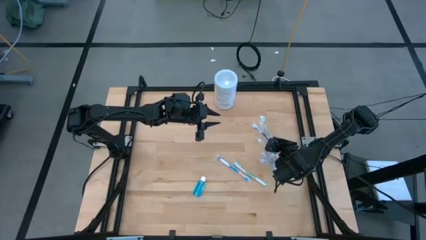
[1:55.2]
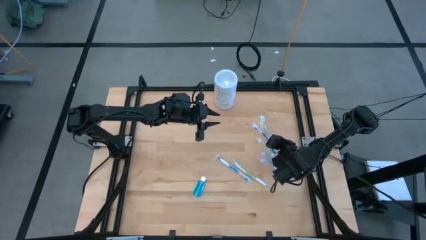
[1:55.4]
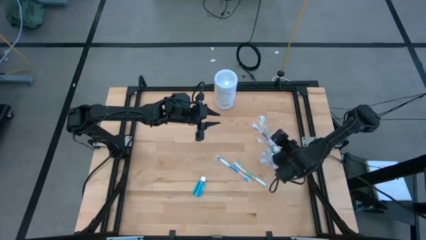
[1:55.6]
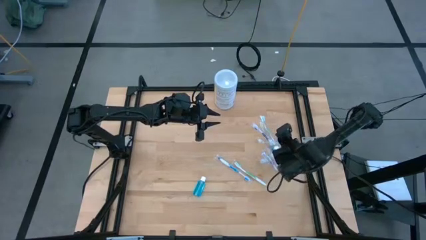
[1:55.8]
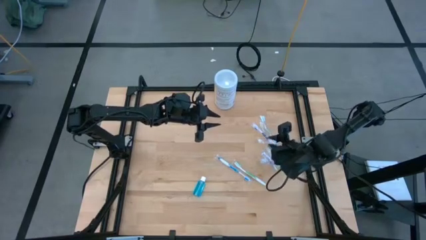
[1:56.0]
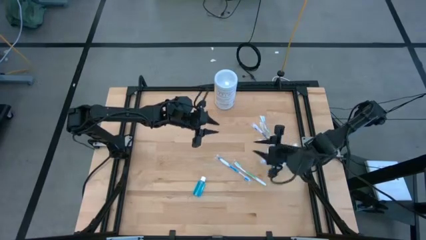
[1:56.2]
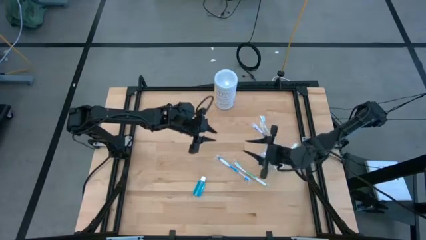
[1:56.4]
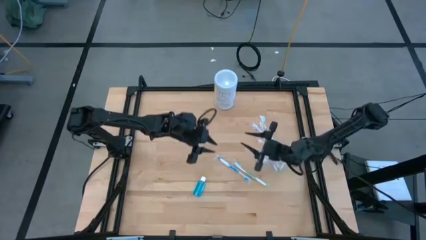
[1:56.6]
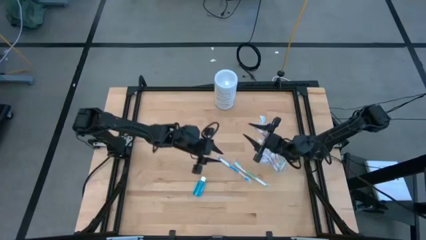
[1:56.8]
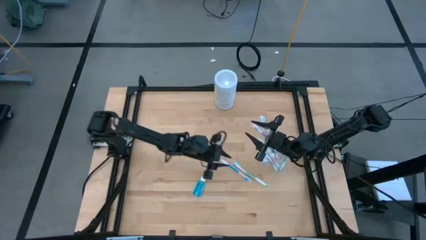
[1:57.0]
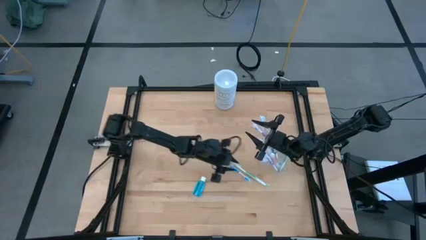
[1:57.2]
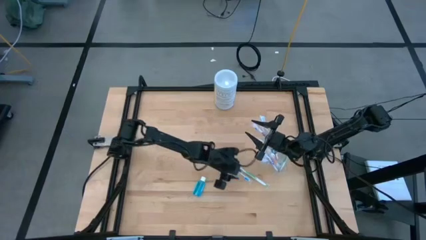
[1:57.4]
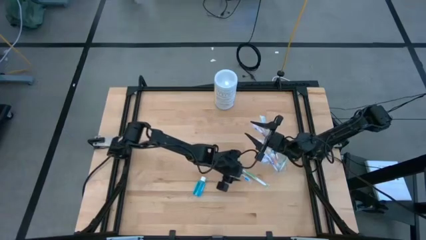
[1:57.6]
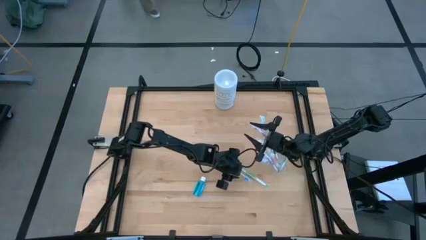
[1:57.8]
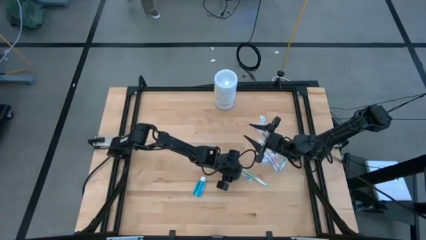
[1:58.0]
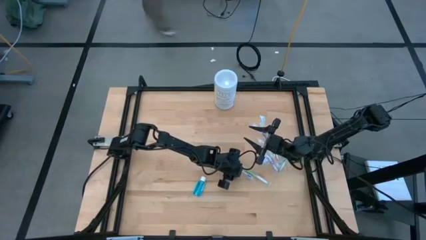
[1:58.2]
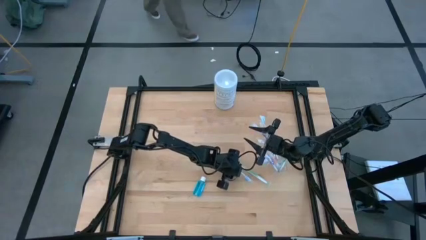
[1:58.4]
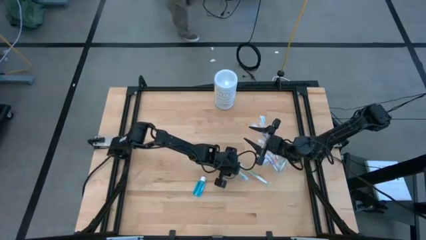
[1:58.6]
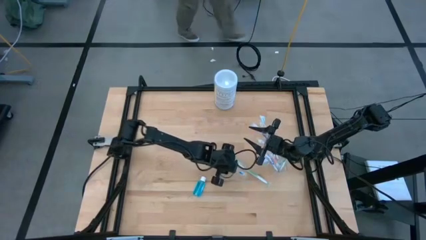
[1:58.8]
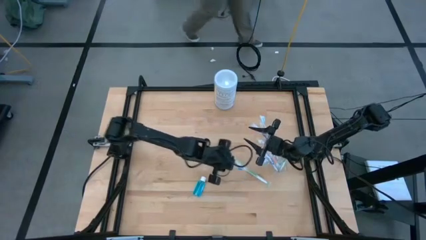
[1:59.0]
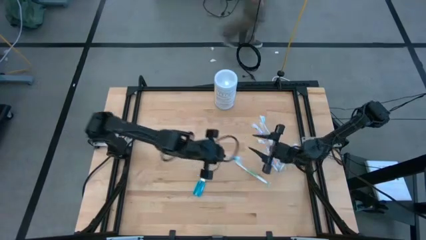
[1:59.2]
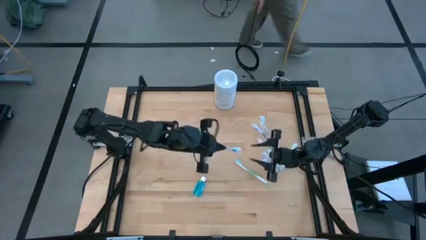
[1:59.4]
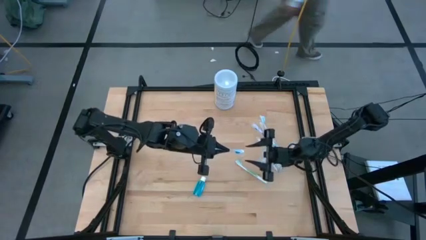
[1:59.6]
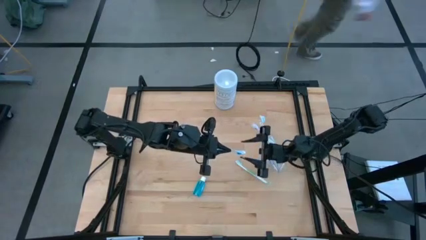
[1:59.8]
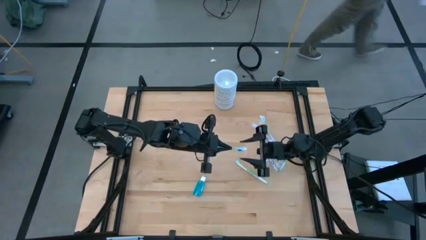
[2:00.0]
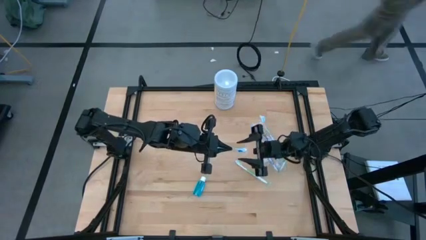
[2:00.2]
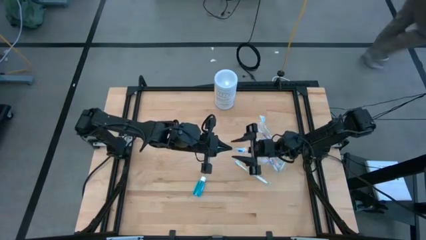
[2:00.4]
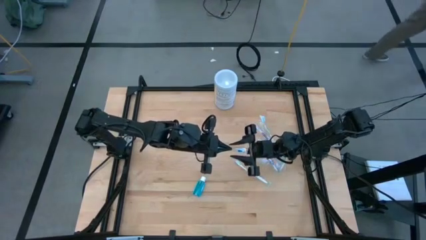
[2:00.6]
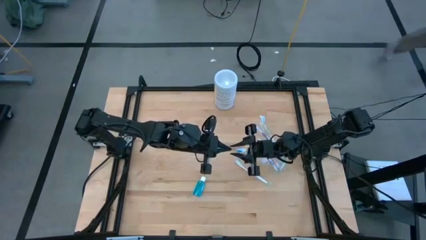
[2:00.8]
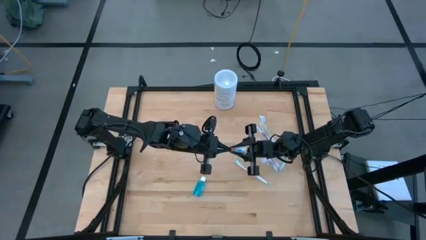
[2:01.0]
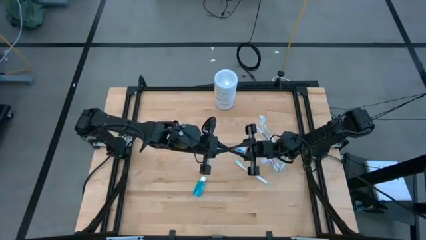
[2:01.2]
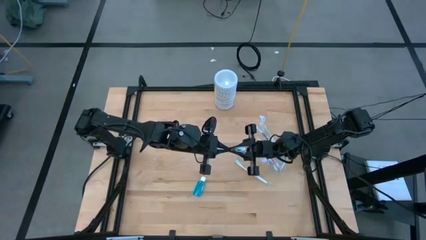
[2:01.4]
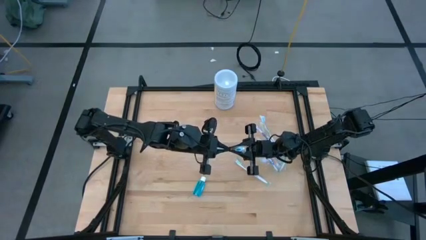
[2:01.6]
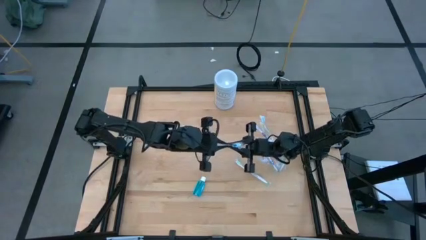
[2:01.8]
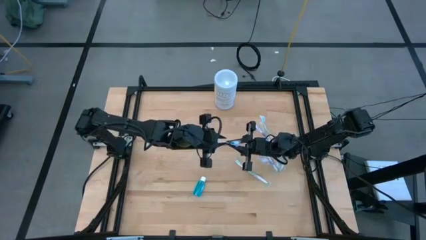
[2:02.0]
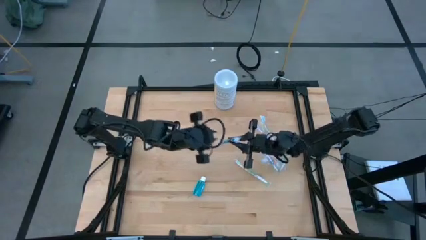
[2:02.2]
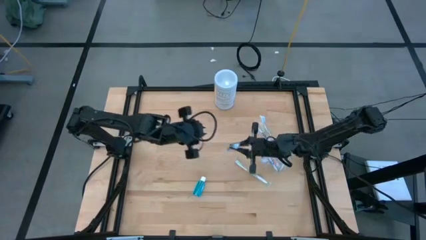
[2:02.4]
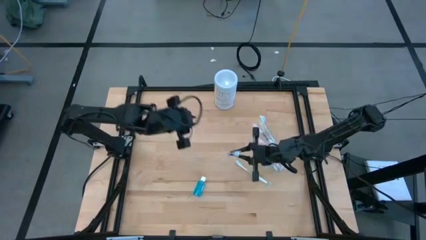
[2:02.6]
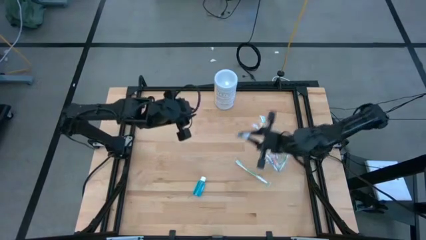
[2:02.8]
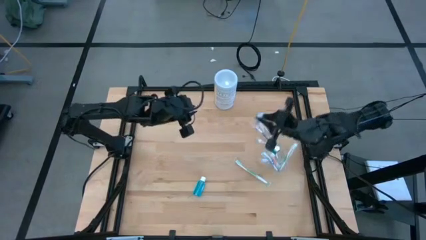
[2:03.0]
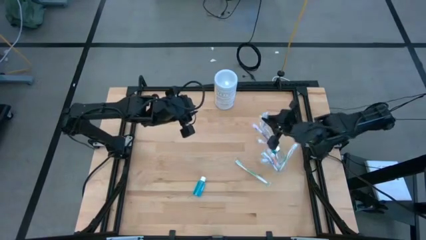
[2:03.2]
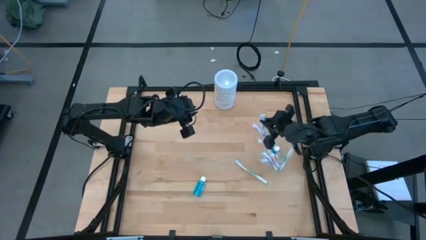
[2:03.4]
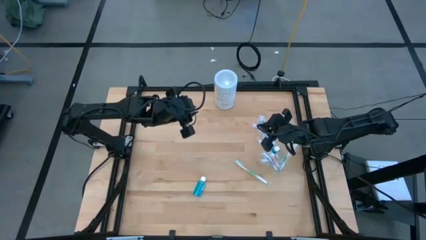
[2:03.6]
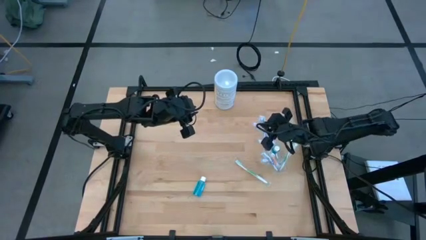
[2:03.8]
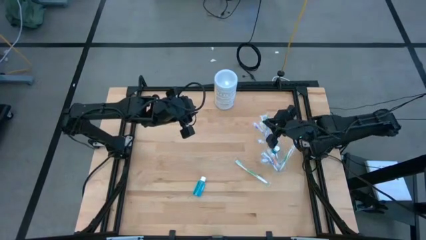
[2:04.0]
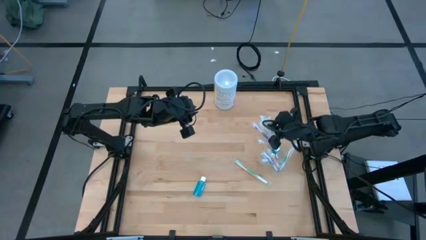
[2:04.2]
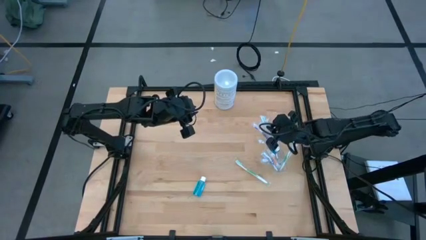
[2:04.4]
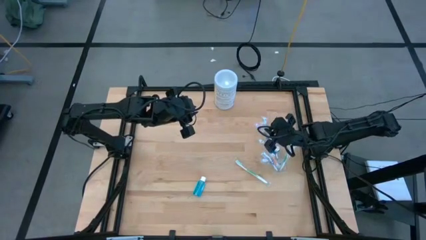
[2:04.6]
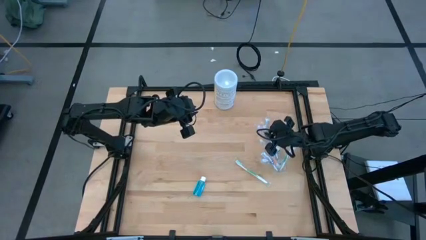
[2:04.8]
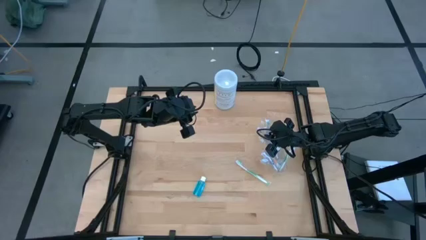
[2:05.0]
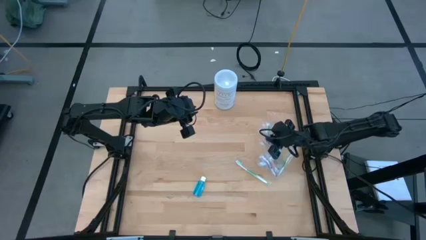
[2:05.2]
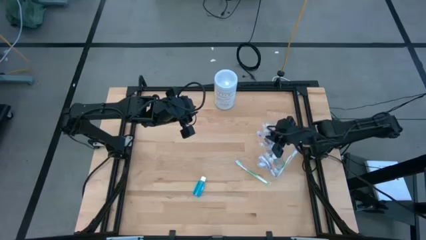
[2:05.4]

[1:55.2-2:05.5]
Task: Pick & Place toothbrushing station
Put the blue toothbrush into the transparent organizer
